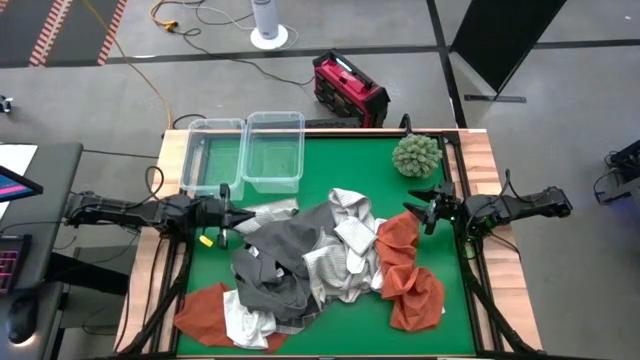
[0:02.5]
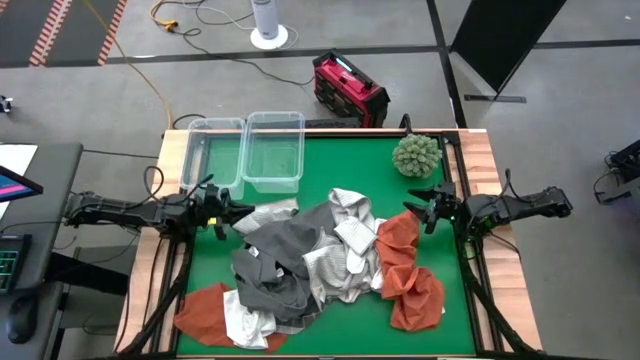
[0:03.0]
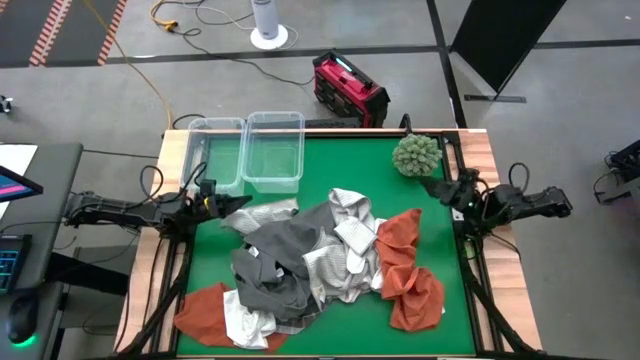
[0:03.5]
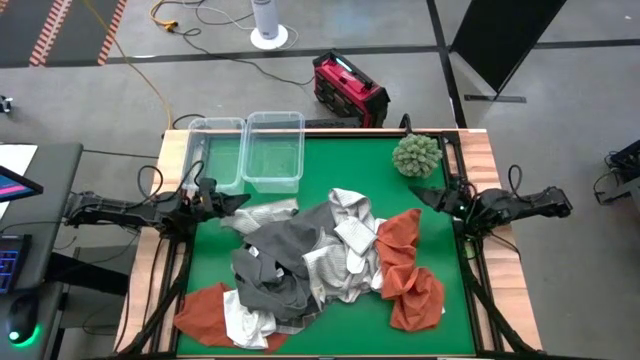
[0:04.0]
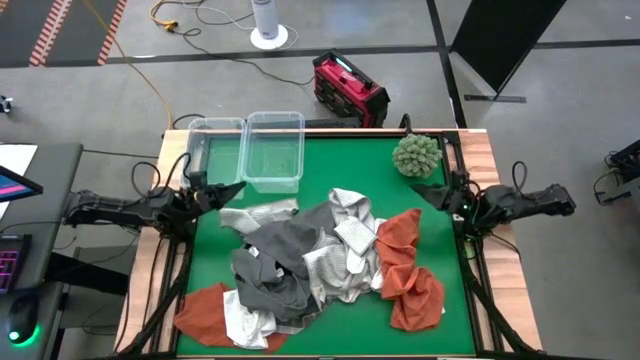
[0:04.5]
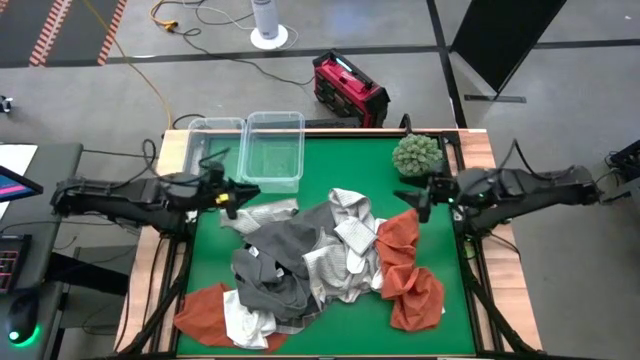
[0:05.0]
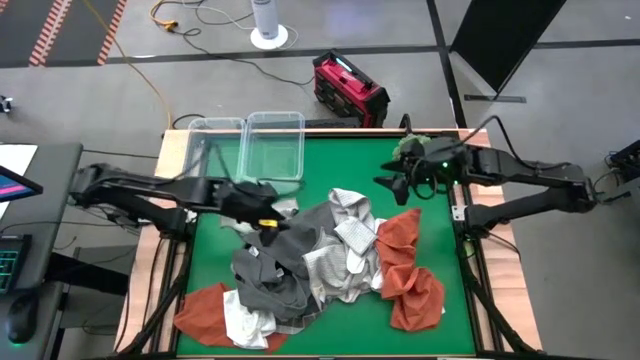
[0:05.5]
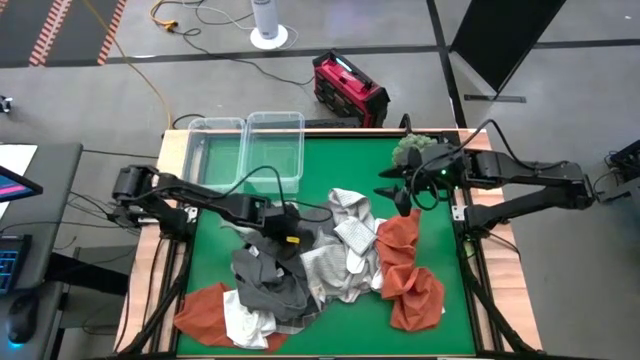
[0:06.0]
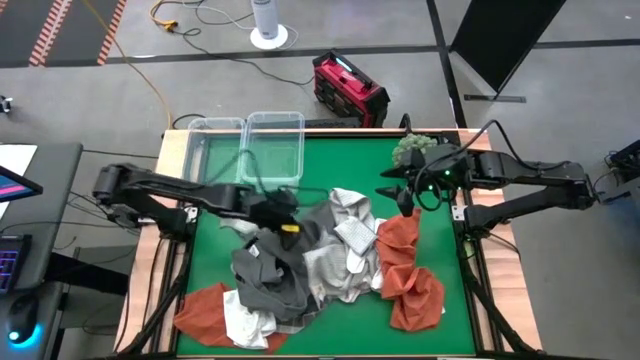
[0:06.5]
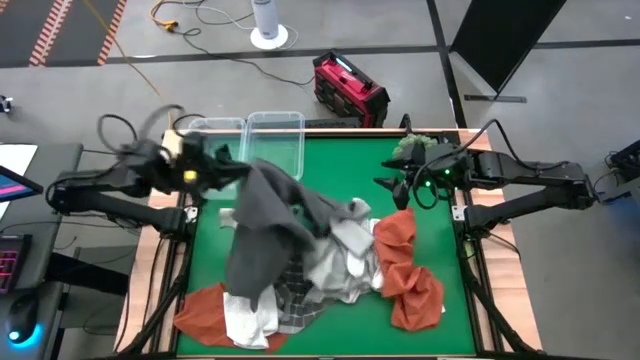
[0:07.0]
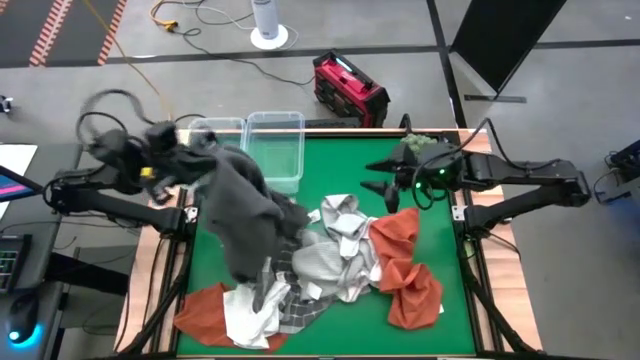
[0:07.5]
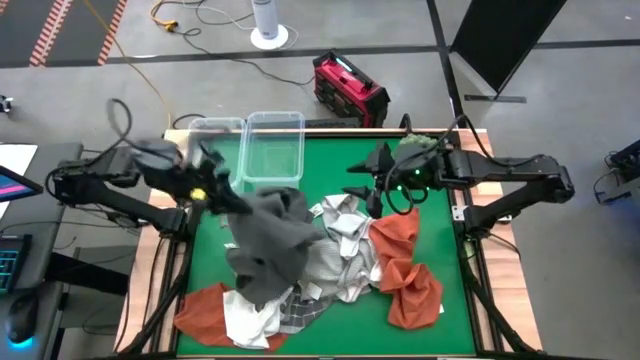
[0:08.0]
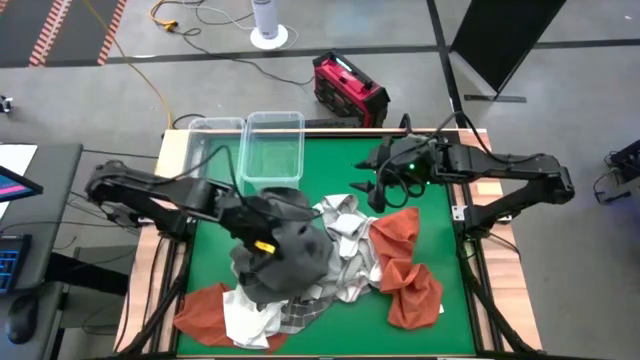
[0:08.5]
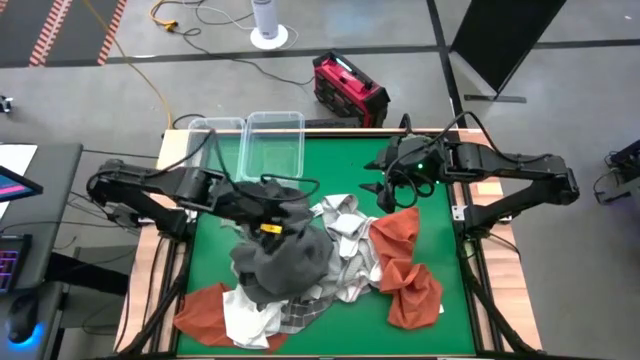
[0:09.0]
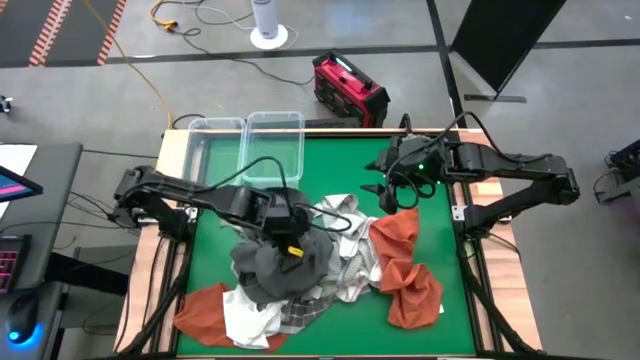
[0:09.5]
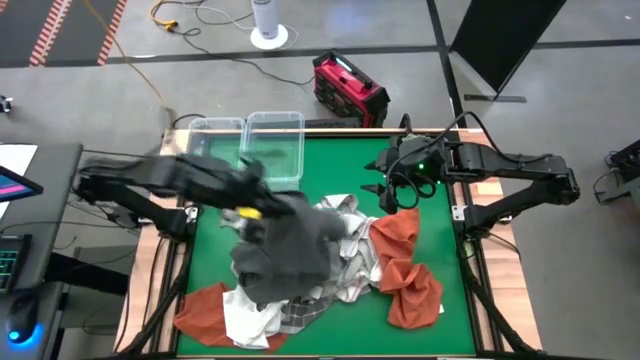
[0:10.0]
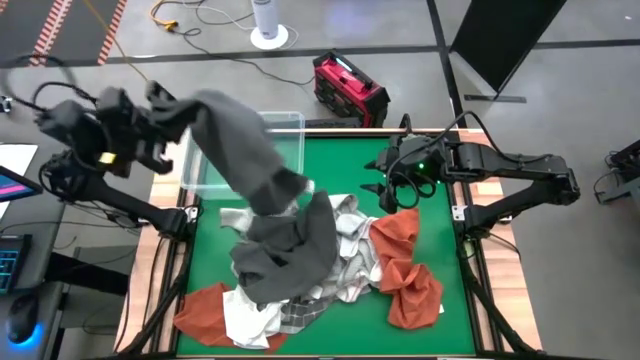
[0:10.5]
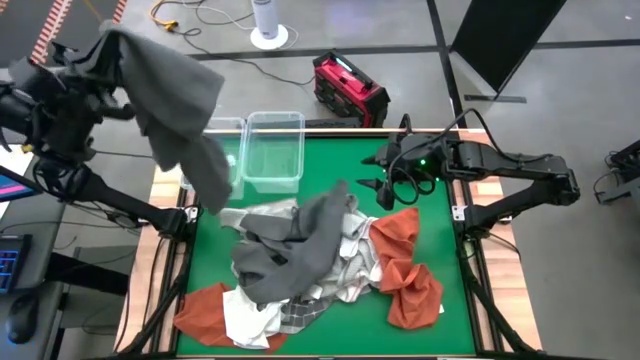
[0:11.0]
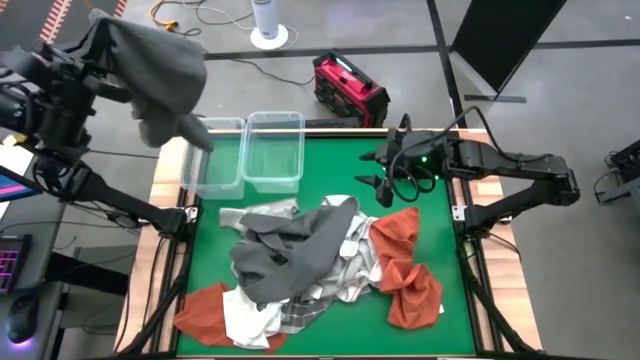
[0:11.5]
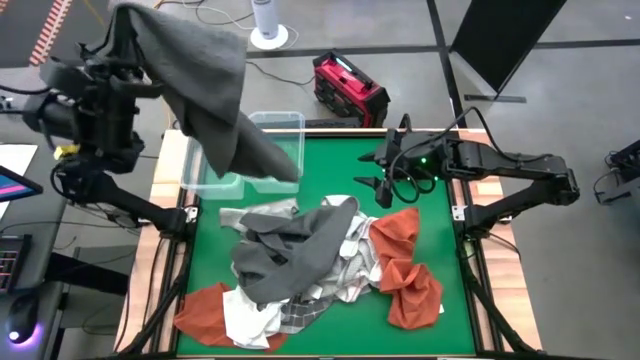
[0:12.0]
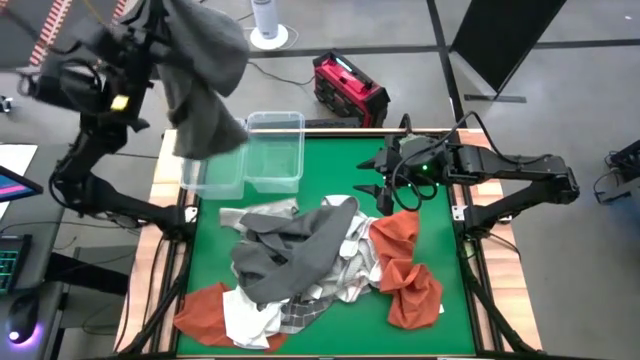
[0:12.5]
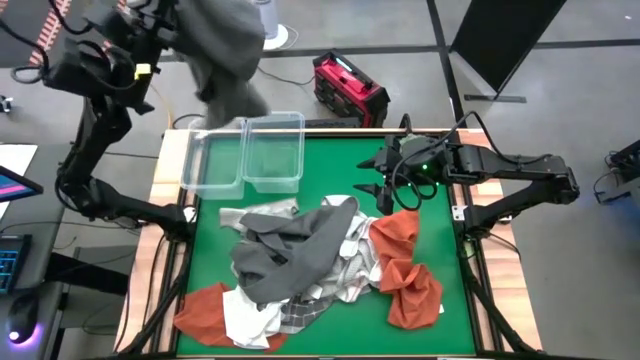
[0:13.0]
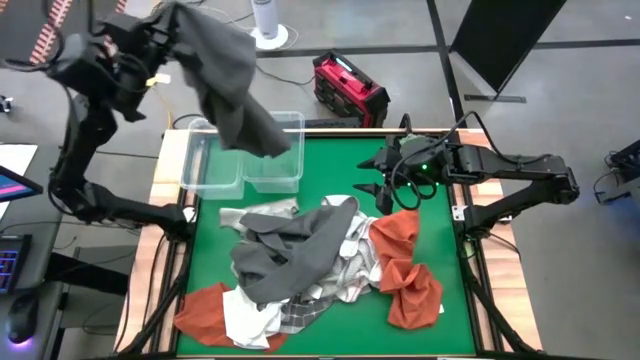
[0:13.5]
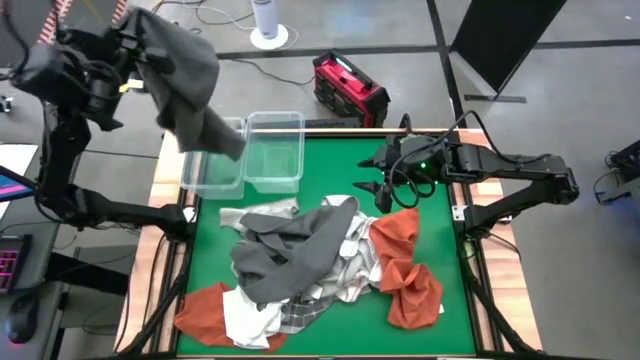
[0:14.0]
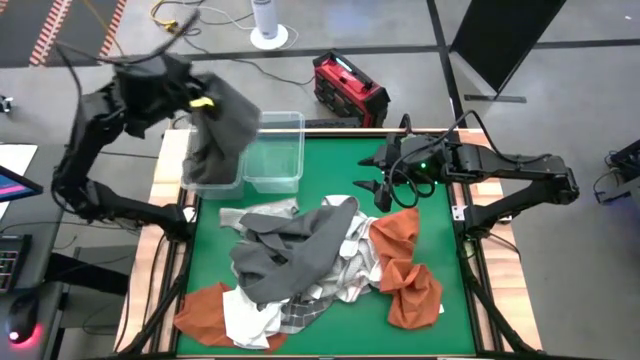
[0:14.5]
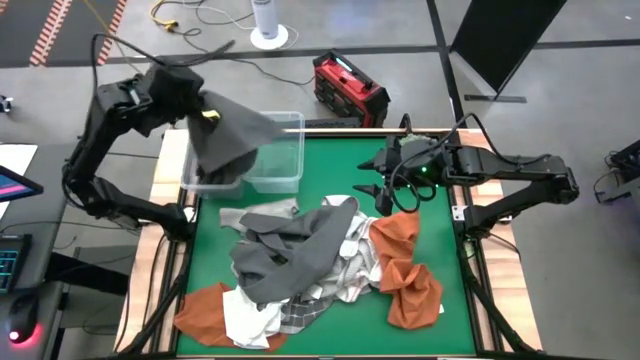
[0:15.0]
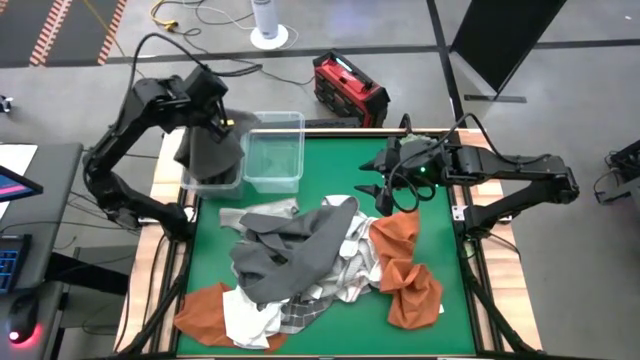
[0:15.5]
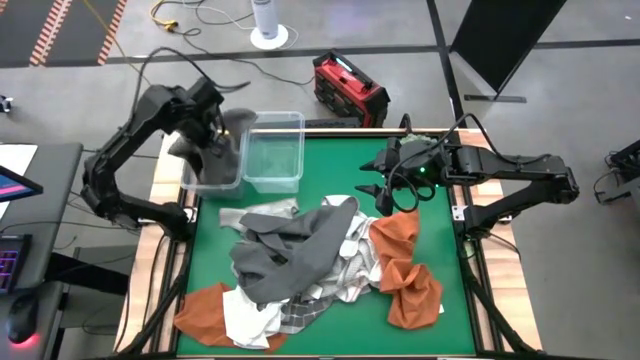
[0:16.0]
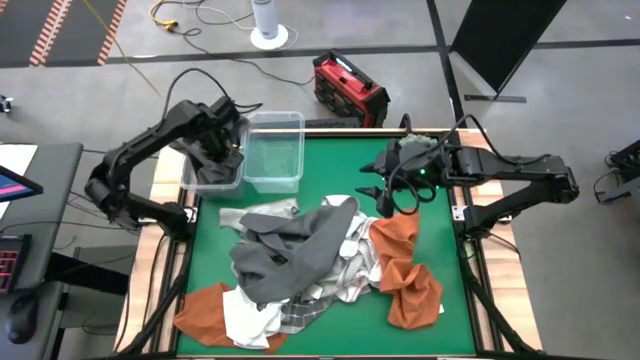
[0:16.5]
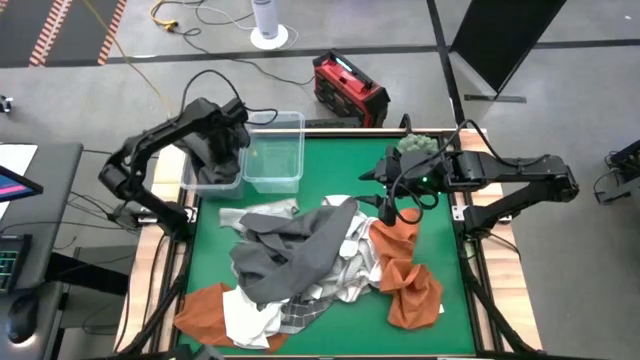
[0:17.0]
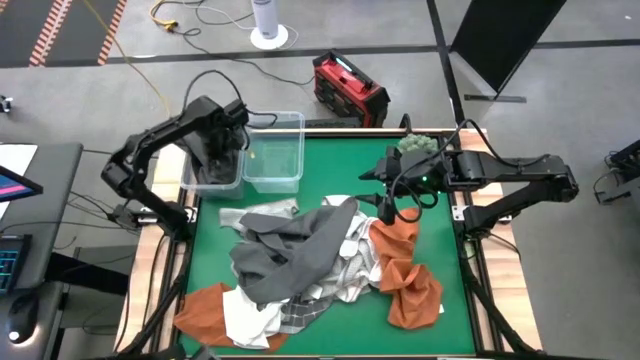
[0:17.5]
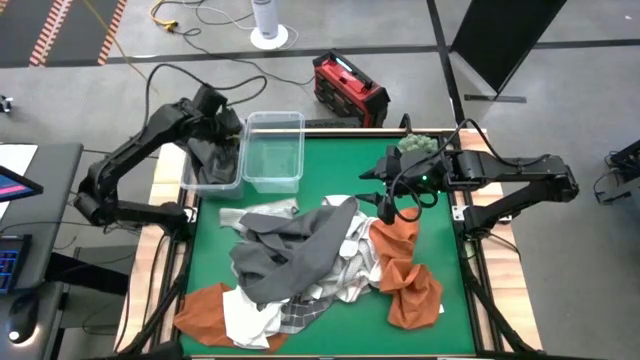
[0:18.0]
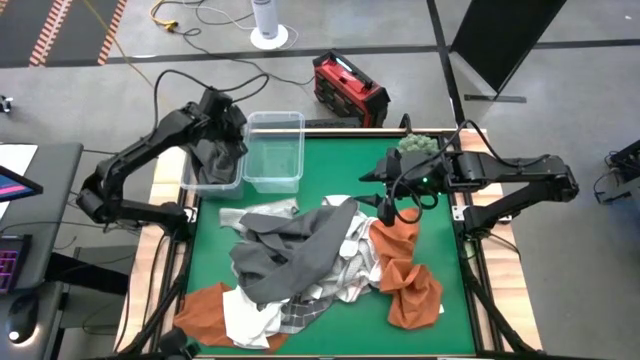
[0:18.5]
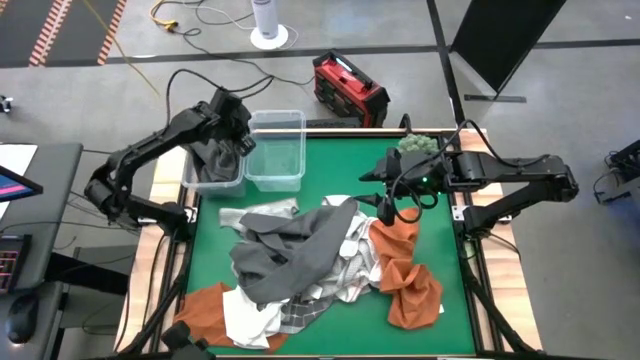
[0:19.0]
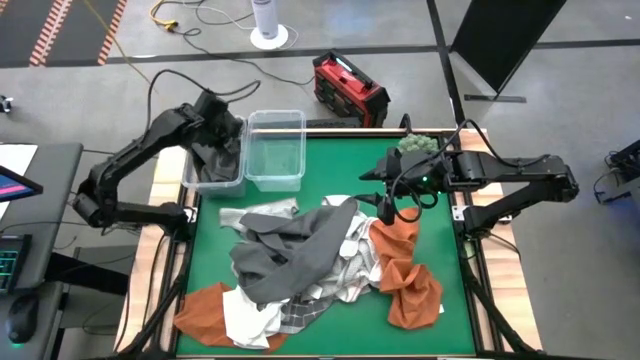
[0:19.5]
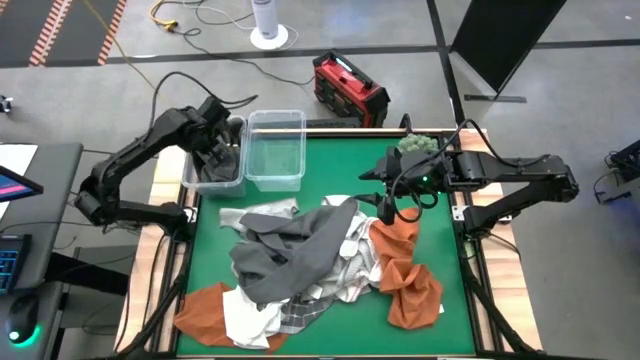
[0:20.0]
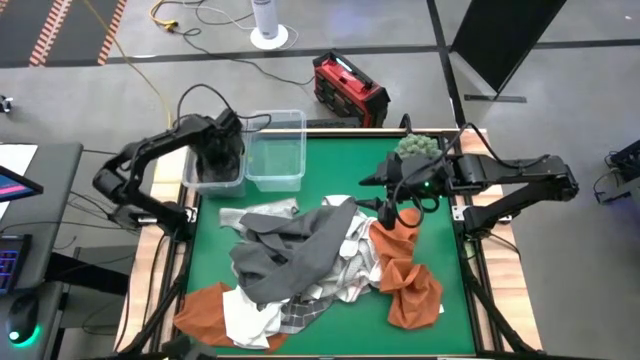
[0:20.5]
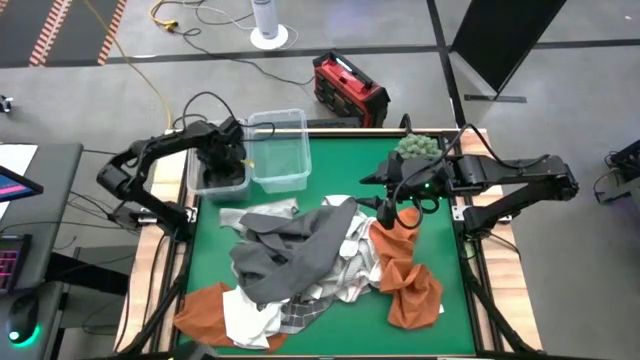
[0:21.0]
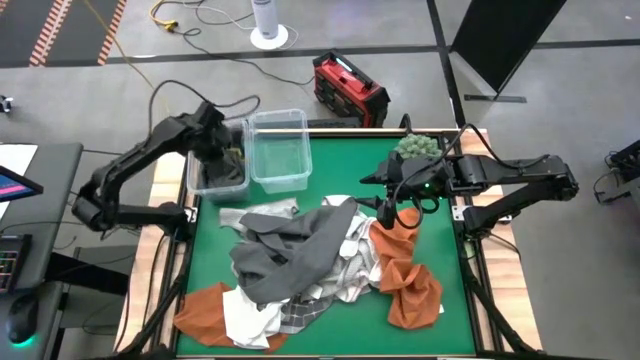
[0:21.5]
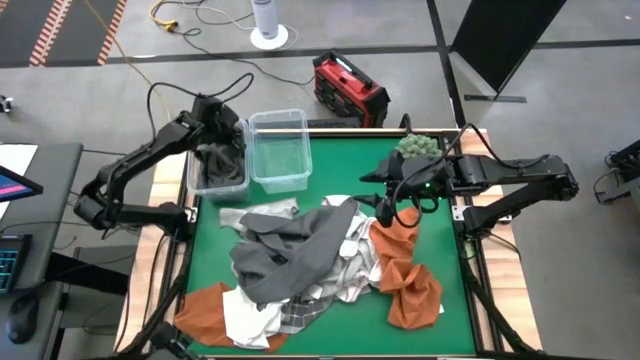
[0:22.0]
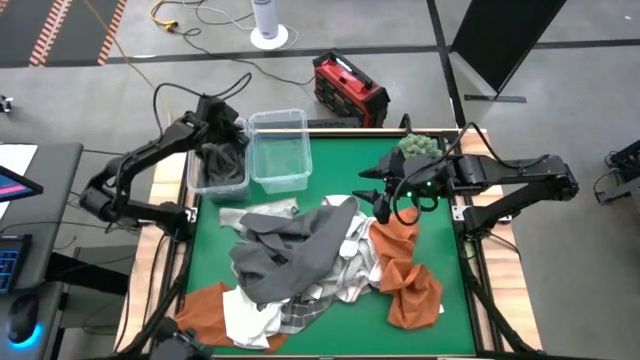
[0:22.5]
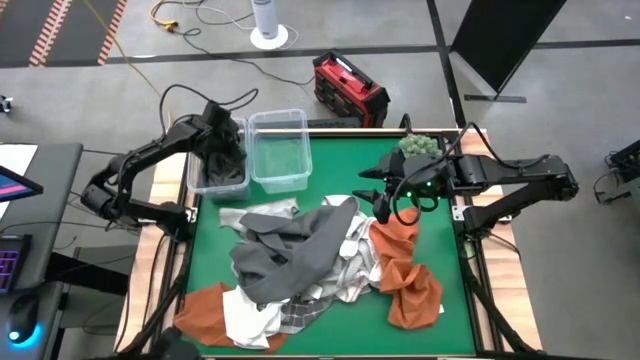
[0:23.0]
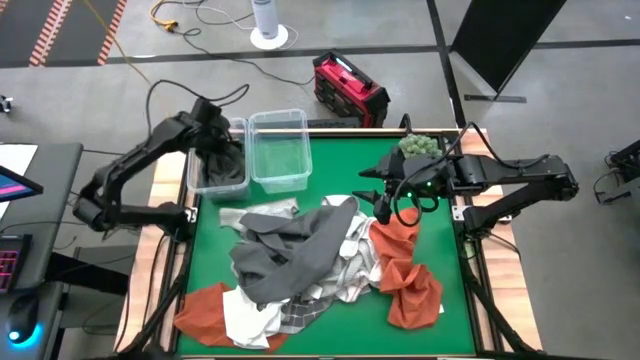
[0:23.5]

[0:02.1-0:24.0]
Task: Sort towels by color in basket
Put the gray towel into the left transparent bin
